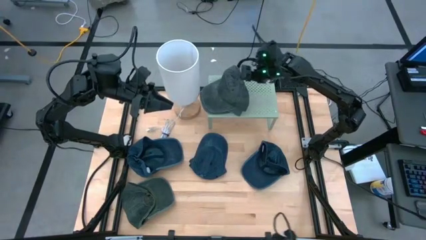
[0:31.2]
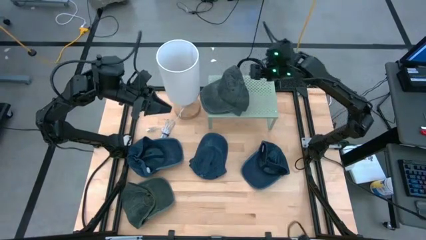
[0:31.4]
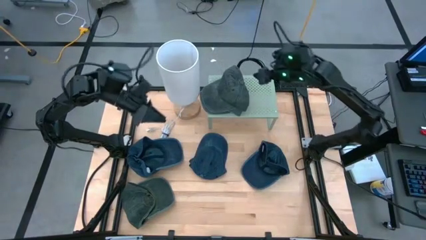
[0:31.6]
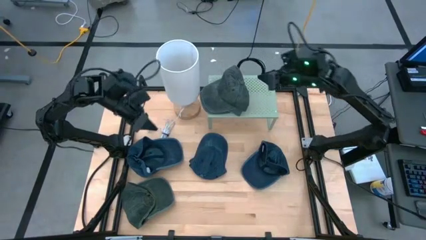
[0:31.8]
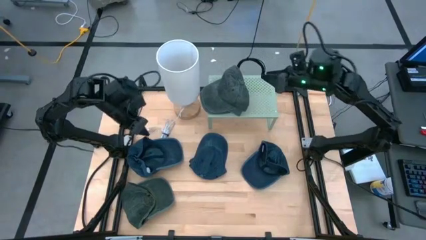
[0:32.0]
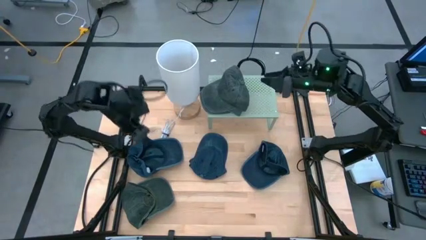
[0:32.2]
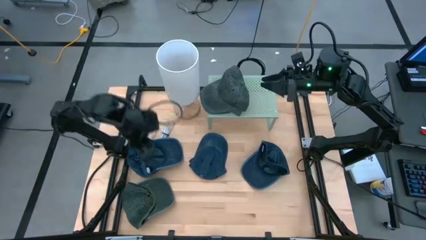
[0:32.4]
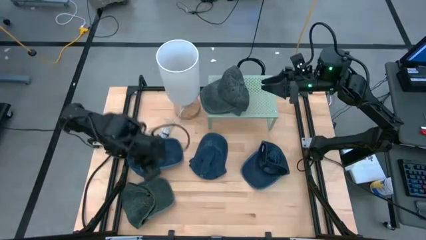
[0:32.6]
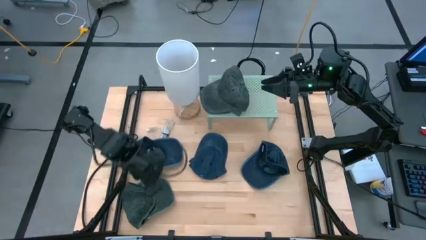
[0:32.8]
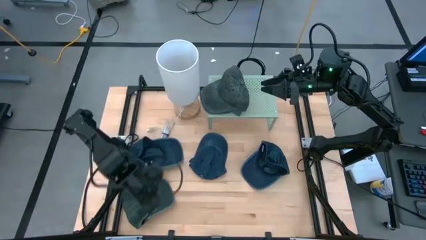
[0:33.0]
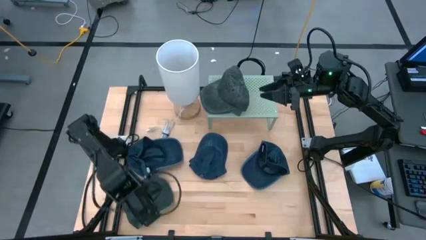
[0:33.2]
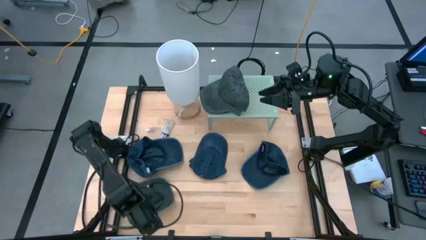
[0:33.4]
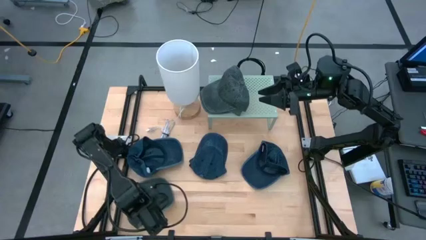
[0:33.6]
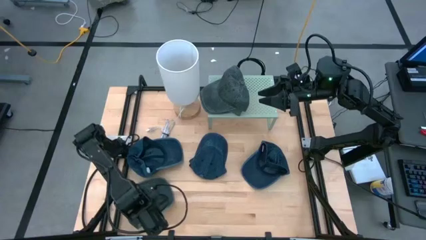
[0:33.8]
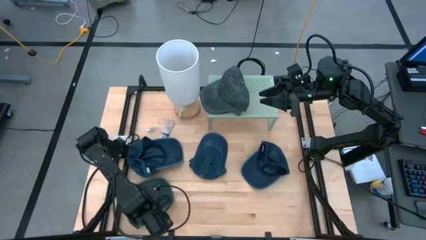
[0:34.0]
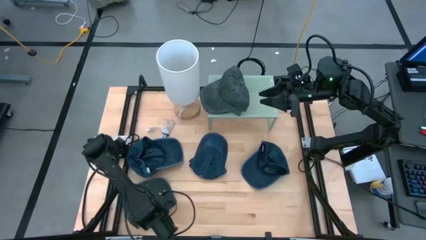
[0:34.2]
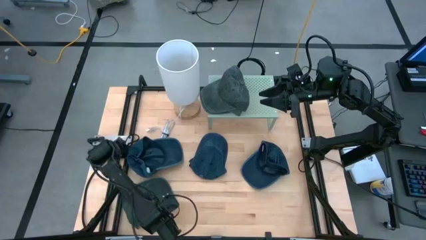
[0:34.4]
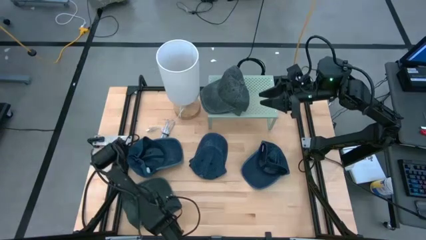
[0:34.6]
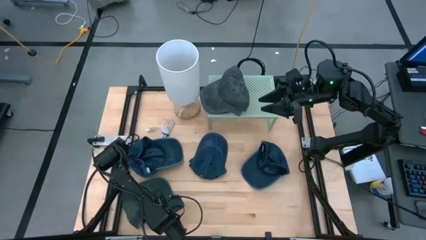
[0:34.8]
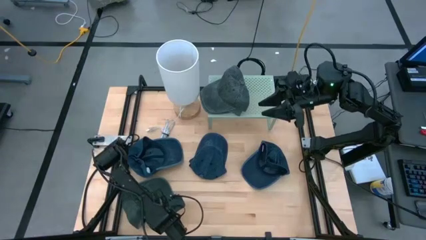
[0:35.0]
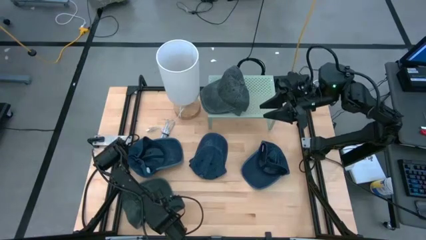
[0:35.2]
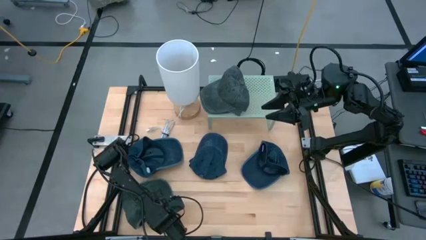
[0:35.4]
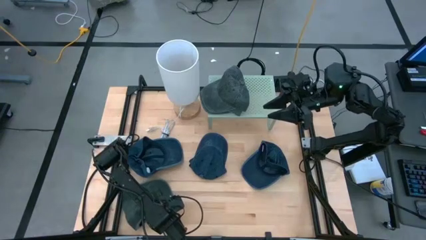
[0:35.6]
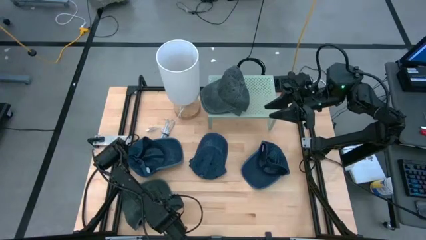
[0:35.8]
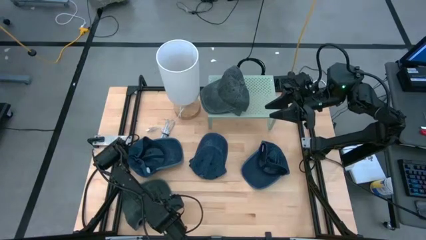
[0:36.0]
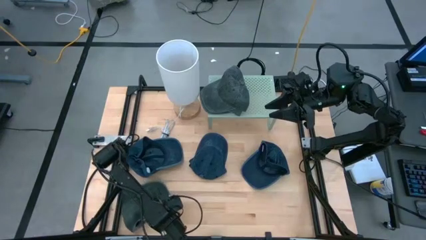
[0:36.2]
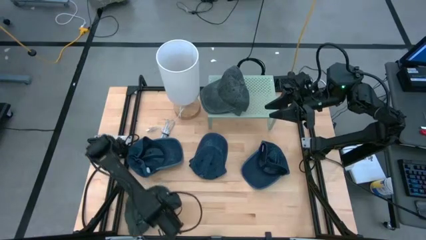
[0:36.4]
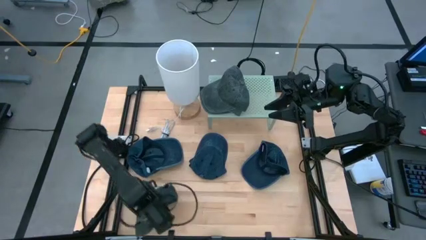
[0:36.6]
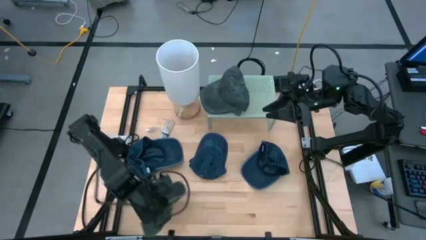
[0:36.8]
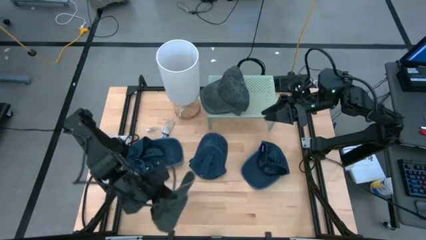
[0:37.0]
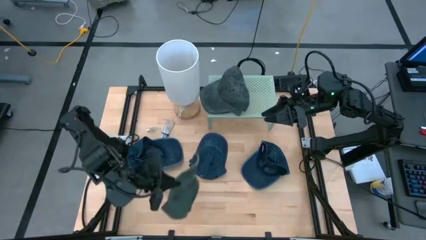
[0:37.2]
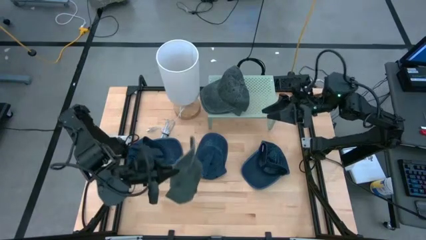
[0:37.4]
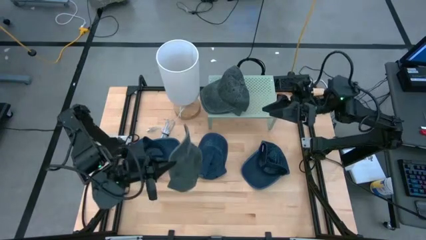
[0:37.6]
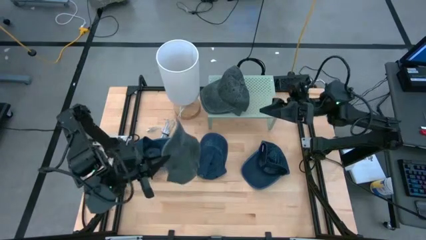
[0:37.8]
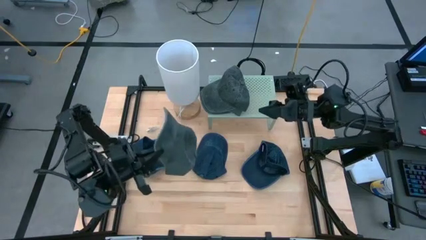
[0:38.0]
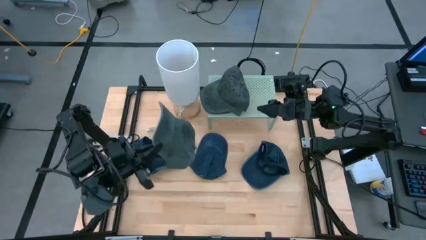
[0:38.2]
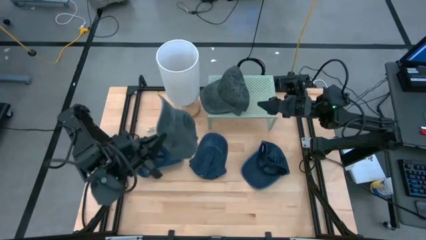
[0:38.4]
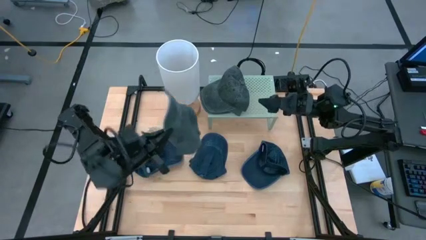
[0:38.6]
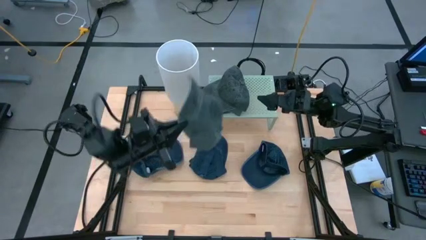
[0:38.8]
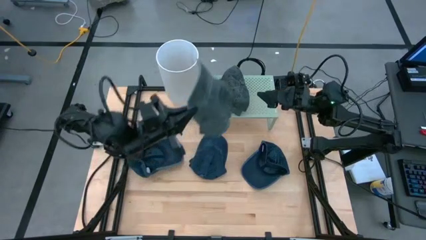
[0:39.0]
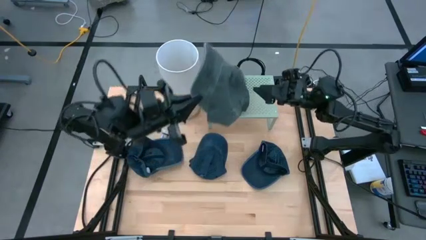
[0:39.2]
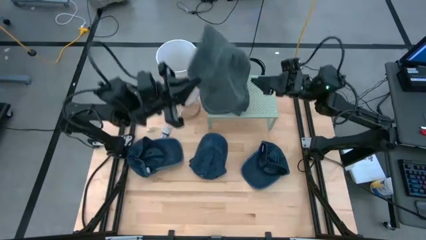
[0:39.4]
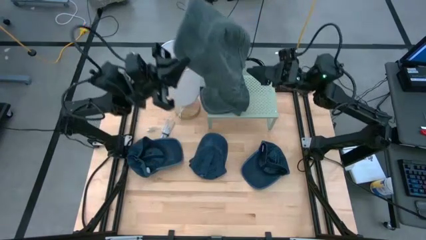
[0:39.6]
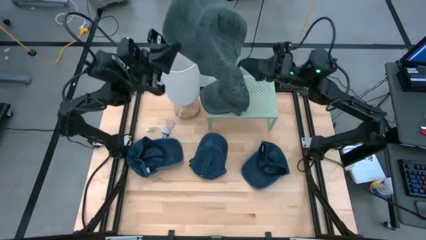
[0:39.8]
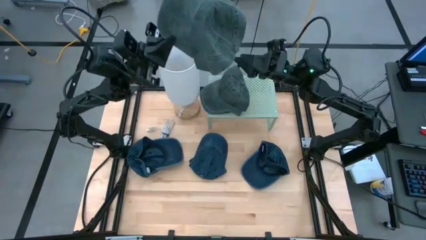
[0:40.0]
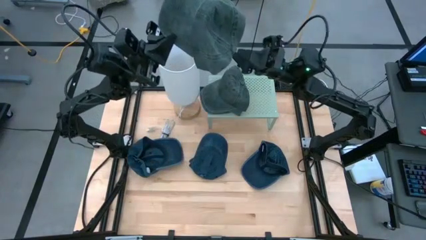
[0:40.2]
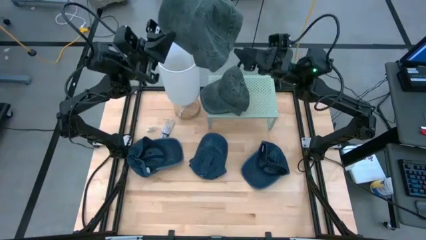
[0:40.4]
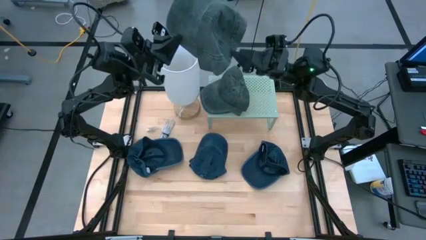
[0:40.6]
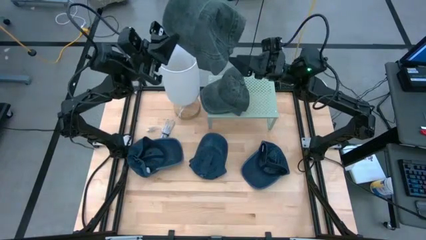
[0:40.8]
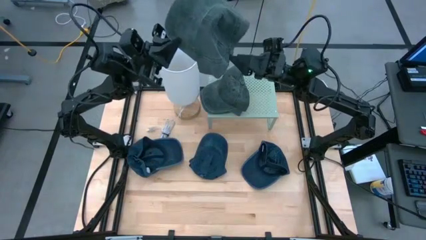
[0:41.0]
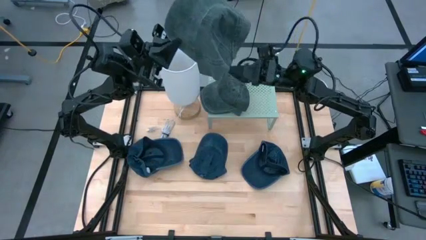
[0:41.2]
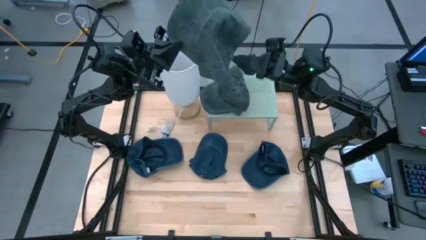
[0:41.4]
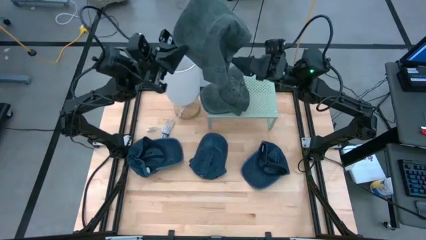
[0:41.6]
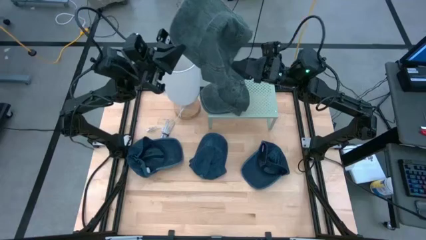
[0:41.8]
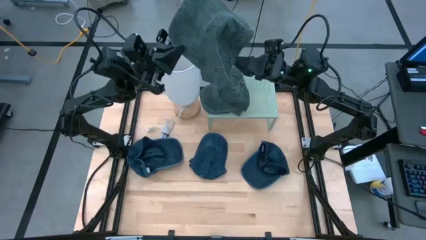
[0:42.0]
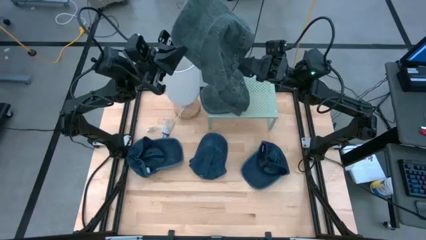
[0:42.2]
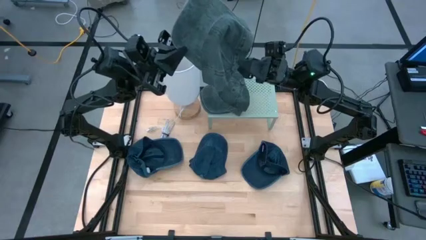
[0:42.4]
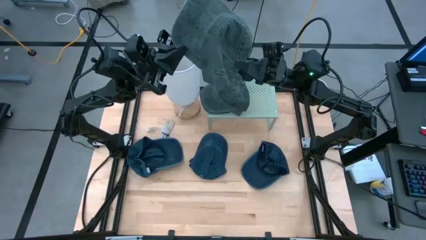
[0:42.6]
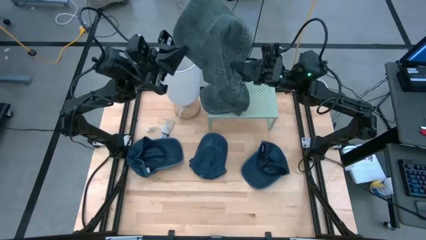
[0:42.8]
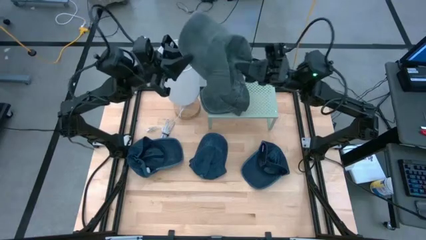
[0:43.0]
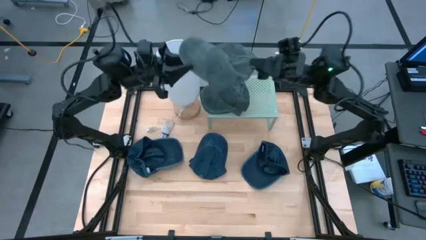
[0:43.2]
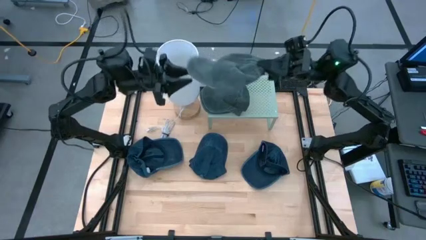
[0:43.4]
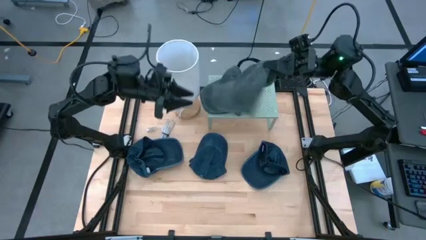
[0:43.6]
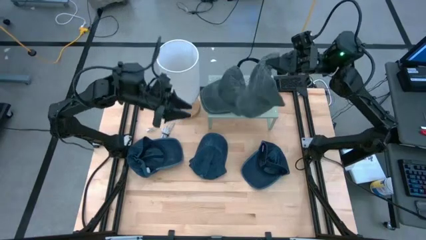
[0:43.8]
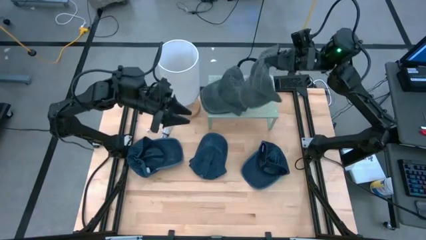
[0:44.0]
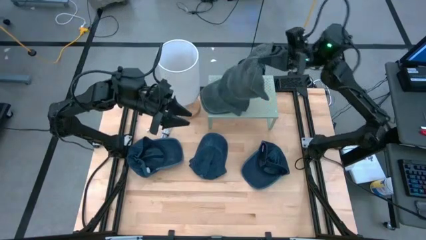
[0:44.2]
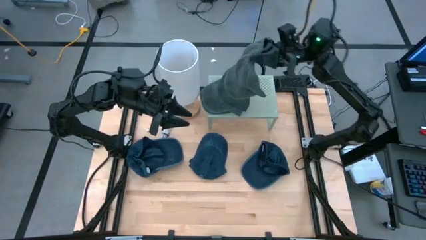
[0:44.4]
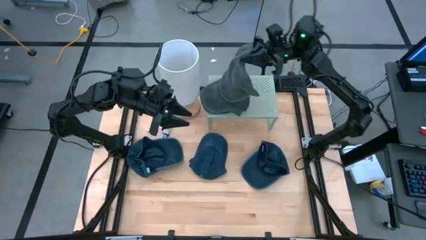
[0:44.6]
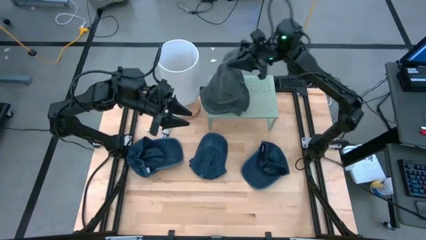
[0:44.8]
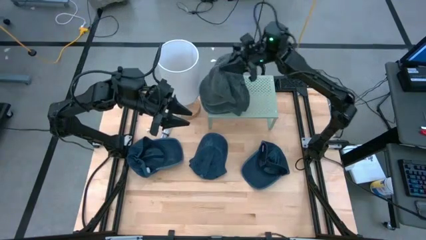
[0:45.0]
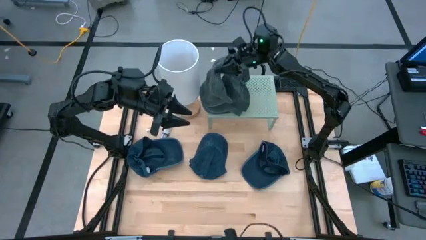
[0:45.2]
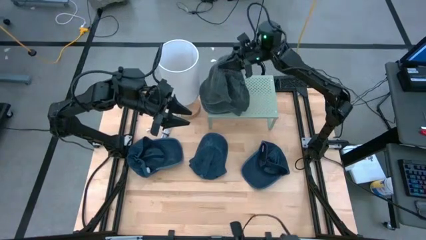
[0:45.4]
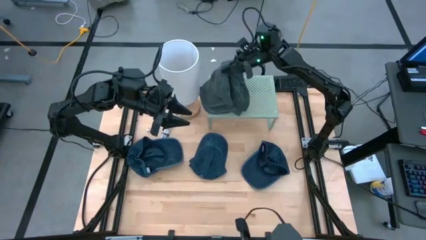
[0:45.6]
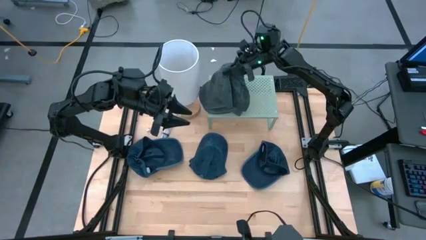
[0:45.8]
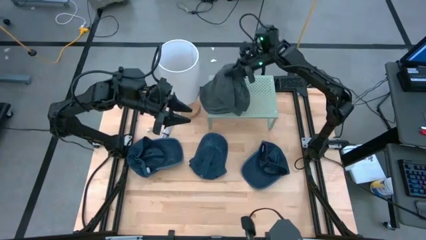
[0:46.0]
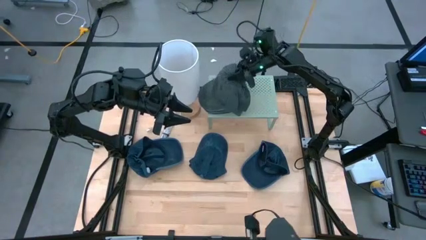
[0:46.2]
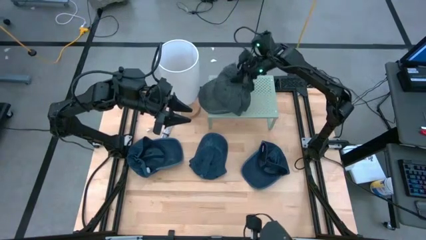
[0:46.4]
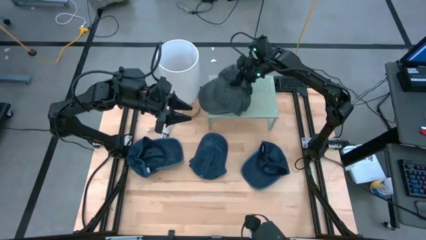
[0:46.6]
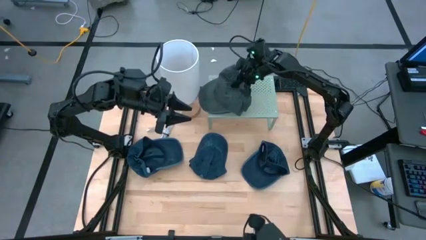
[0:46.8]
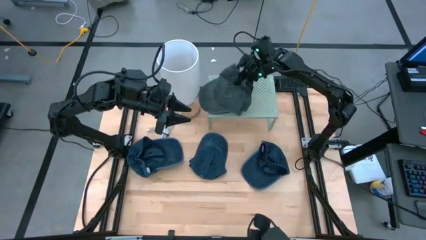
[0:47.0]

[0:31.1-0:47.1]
Task: Pick & Place hat
Stack the green cap on the green cap on the shelf
